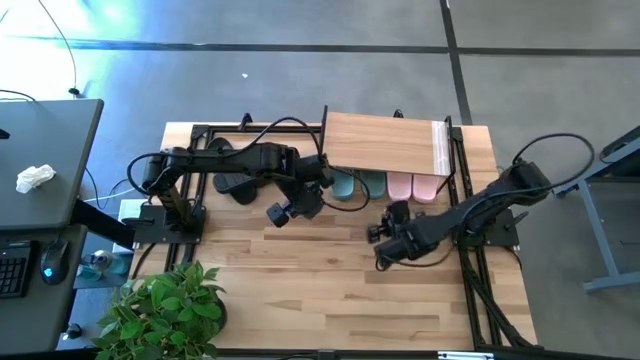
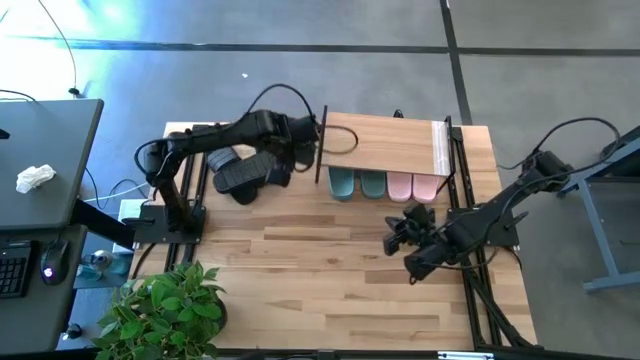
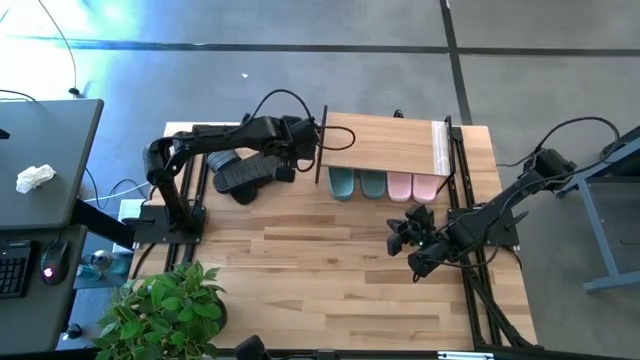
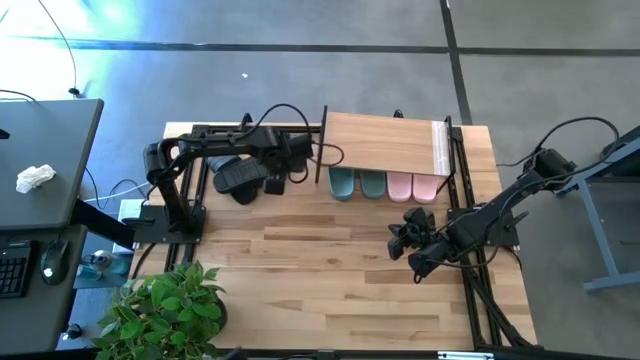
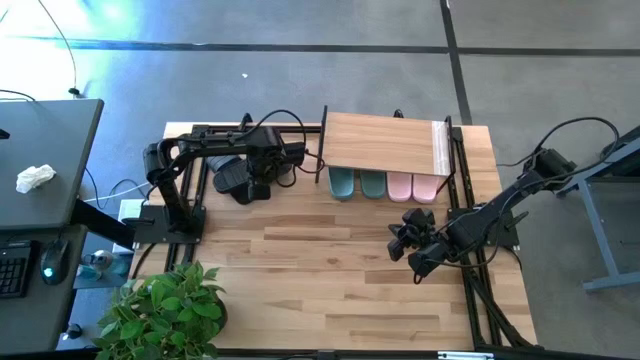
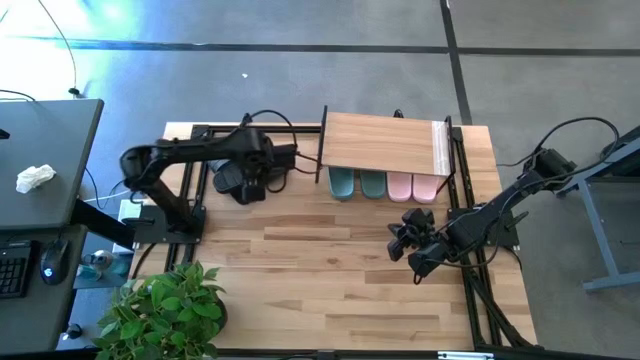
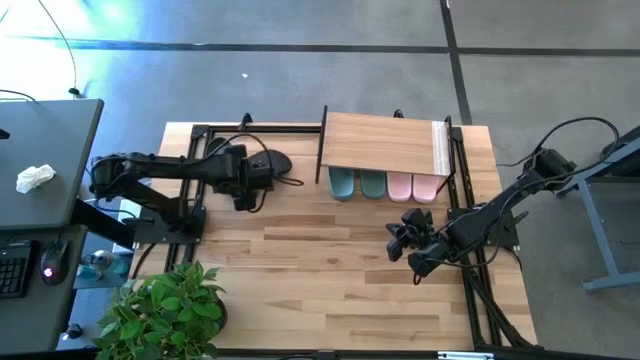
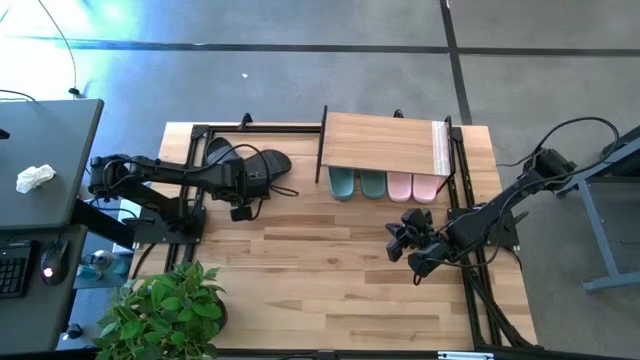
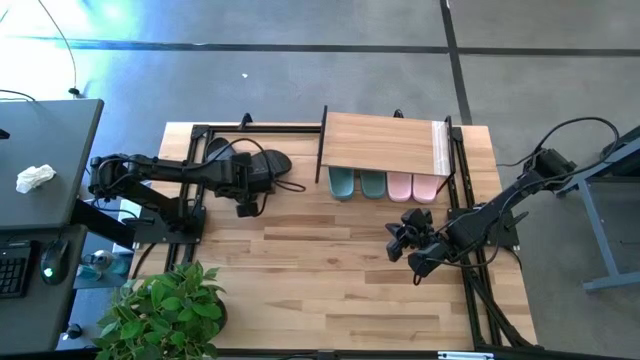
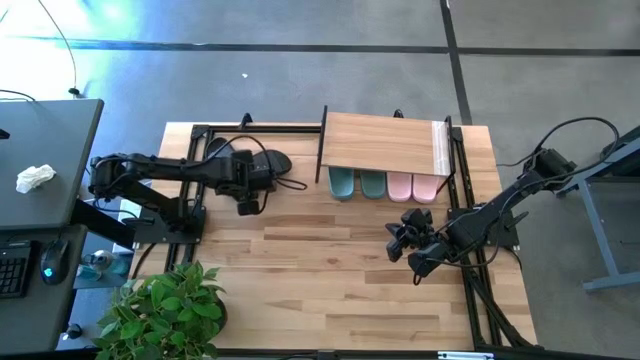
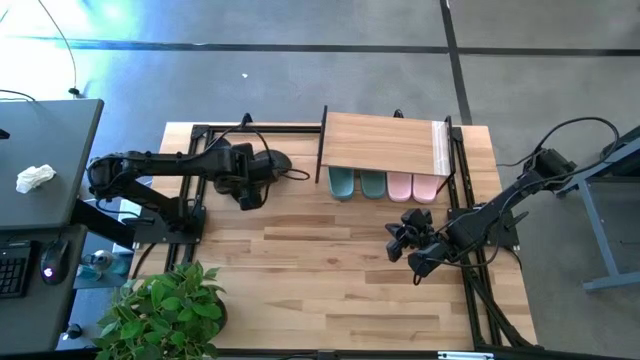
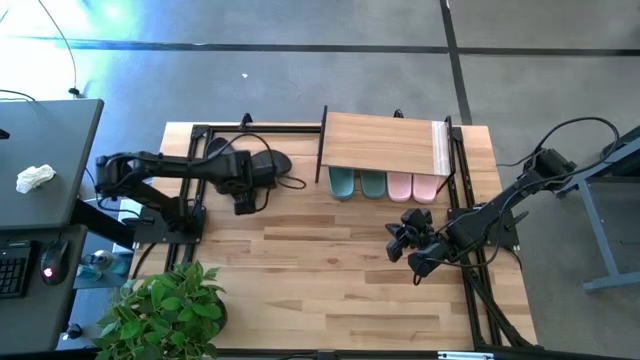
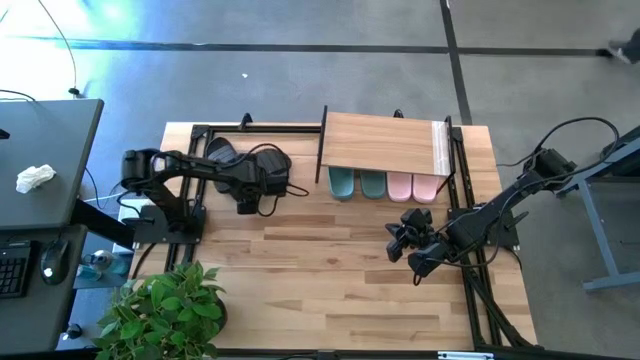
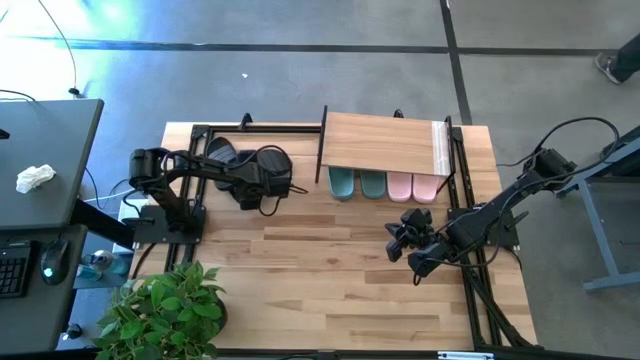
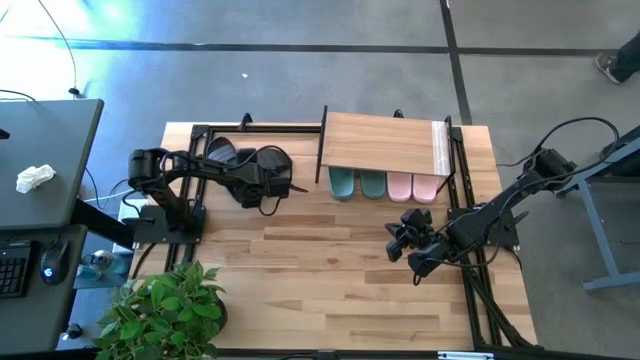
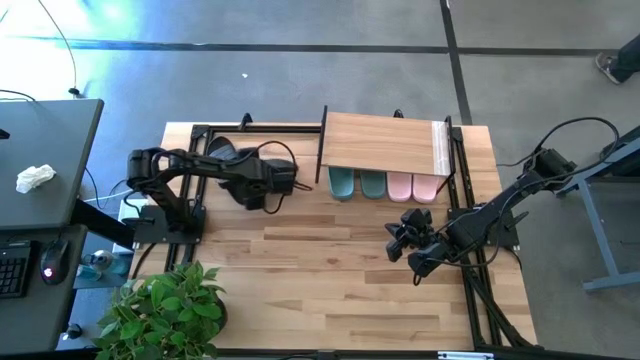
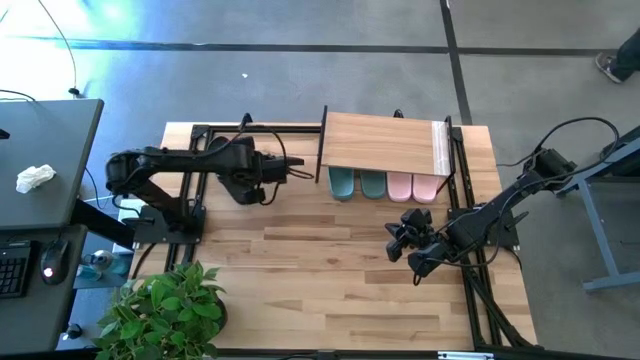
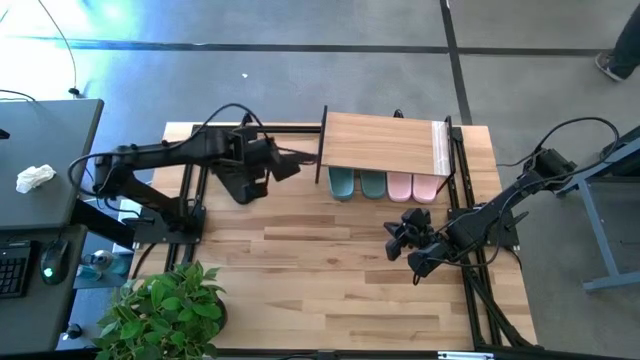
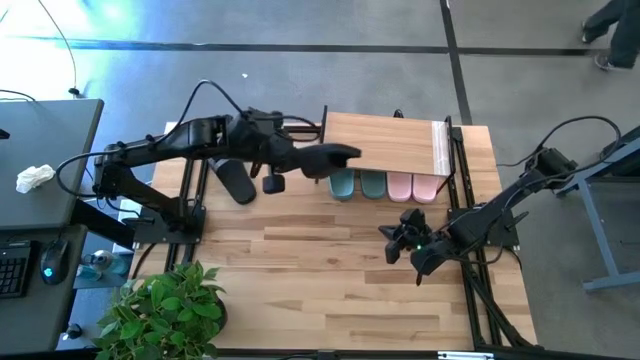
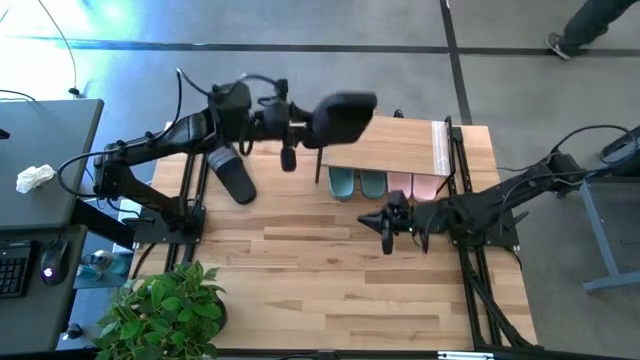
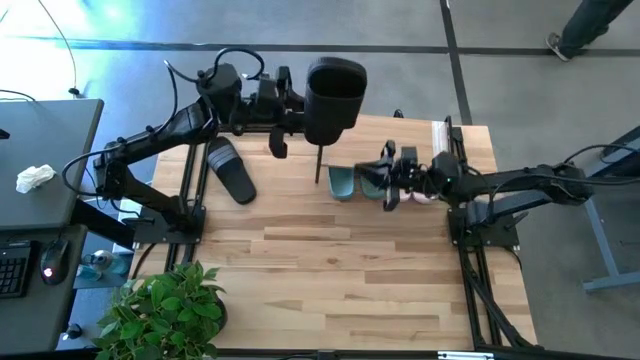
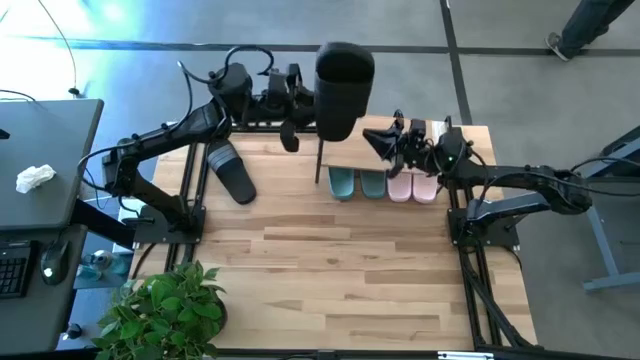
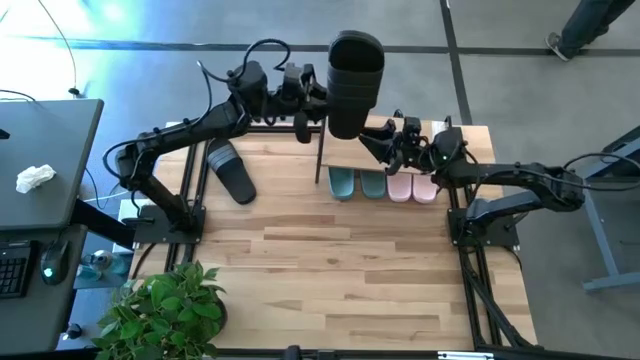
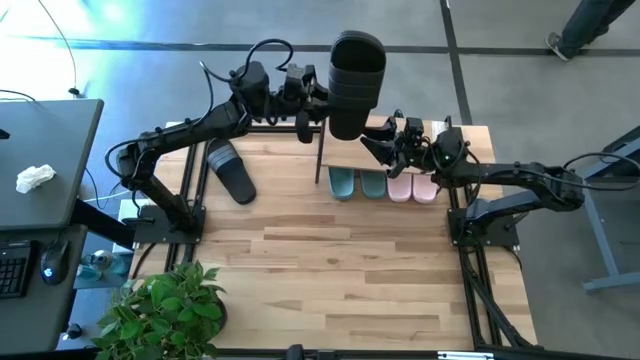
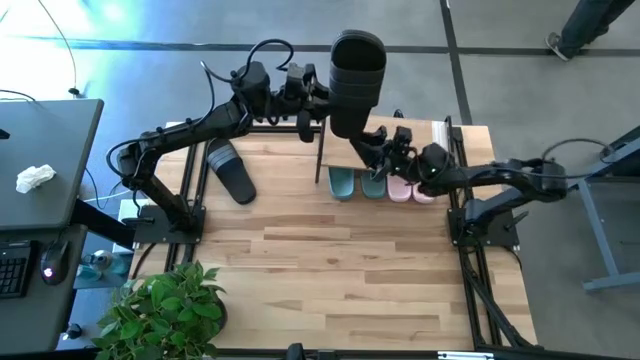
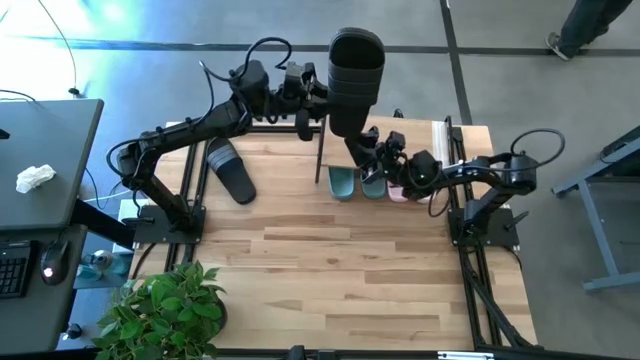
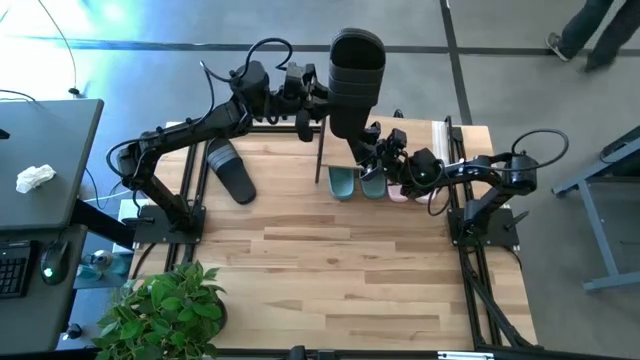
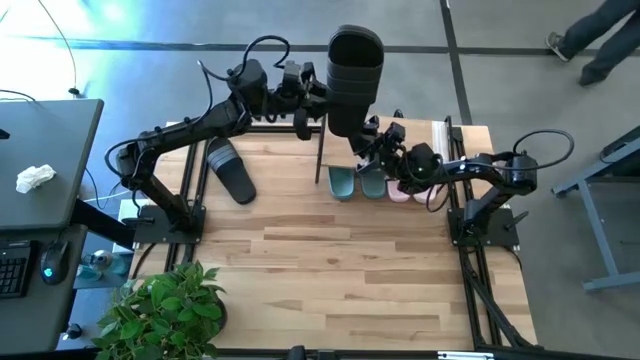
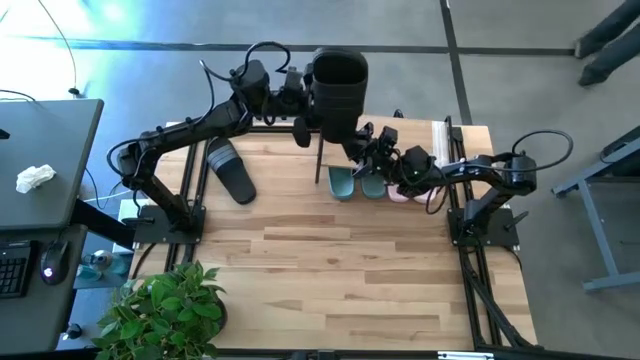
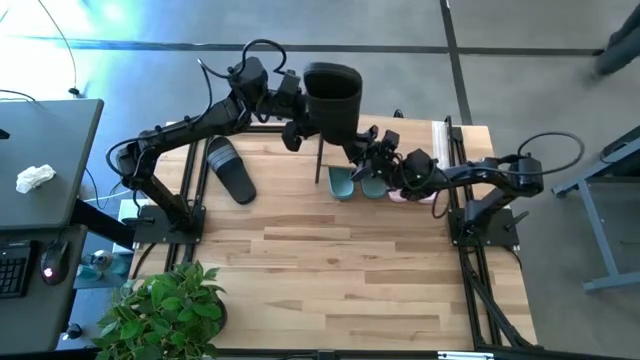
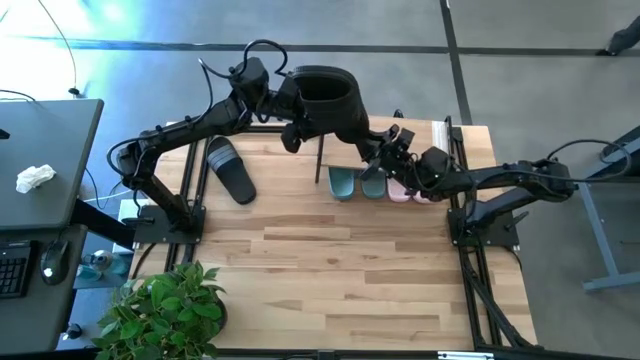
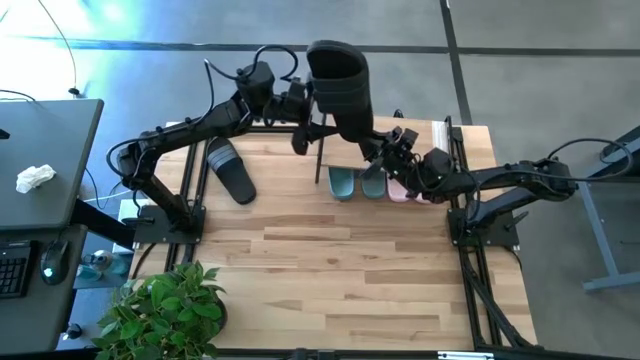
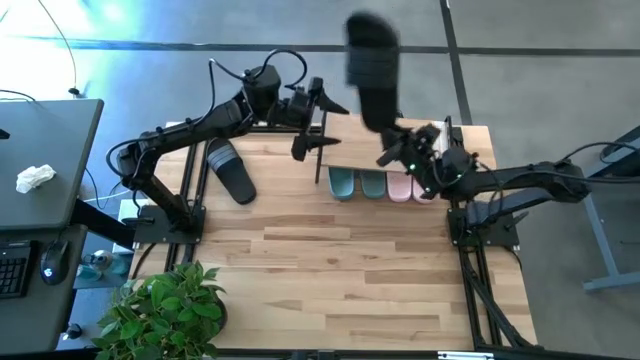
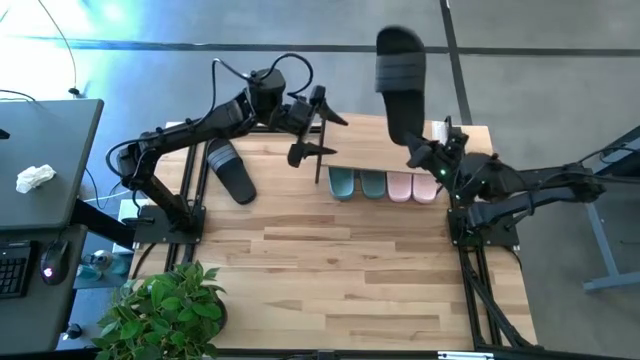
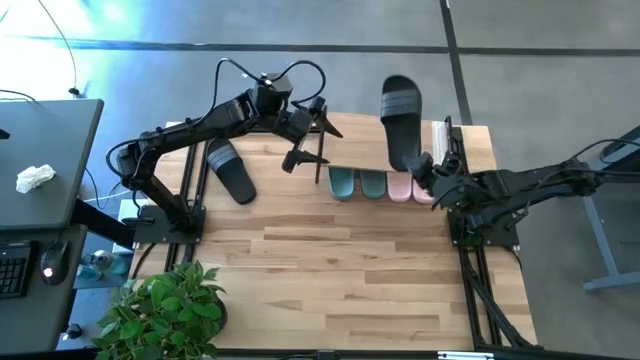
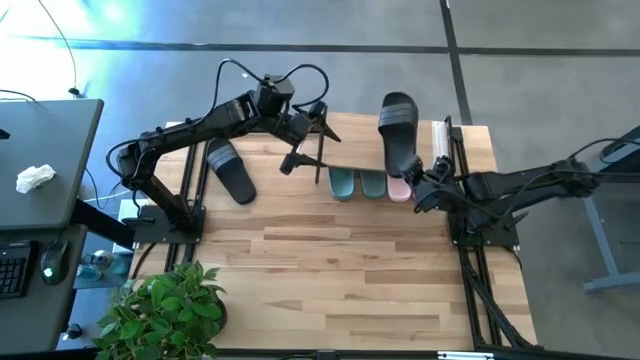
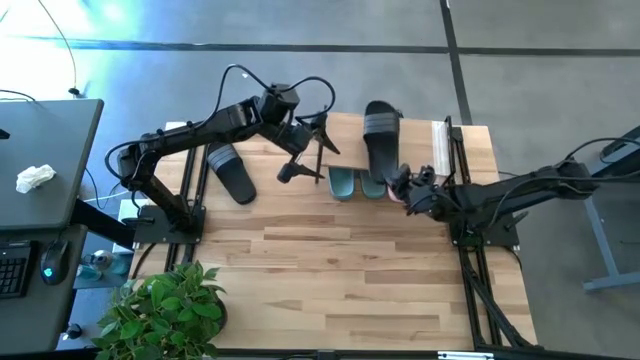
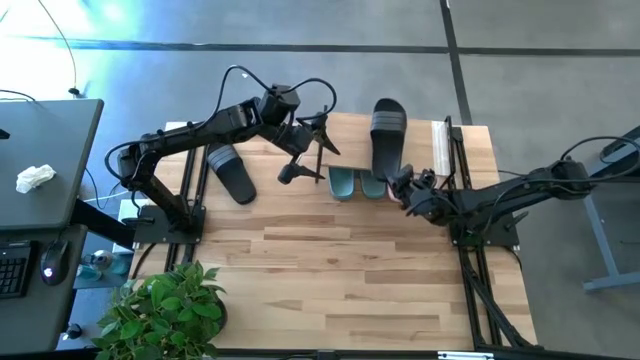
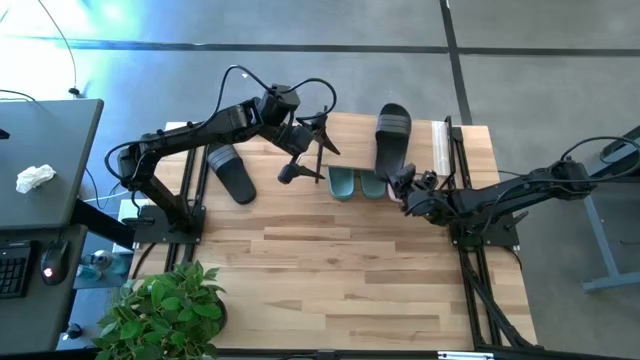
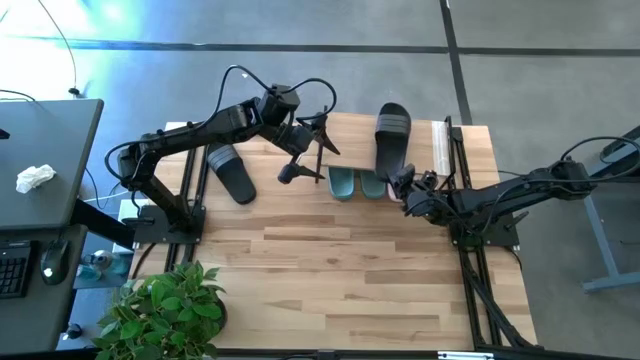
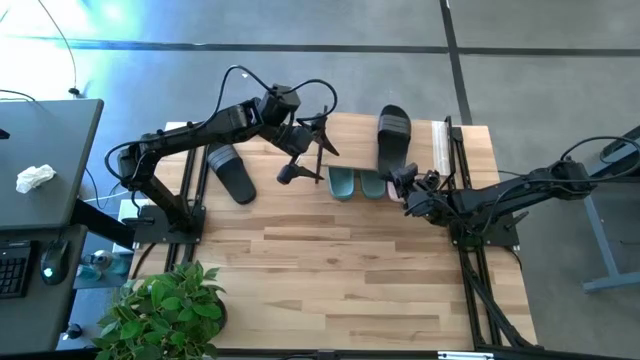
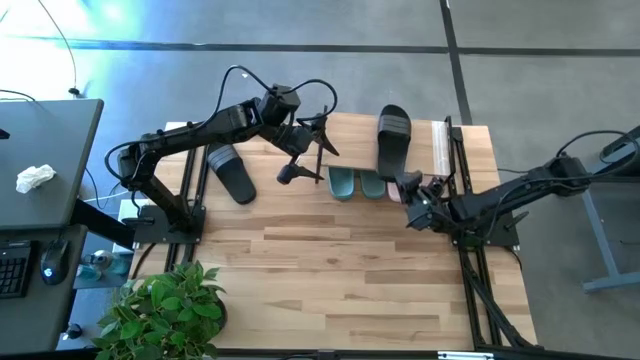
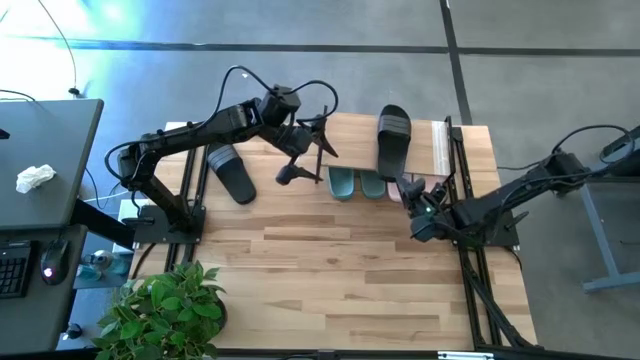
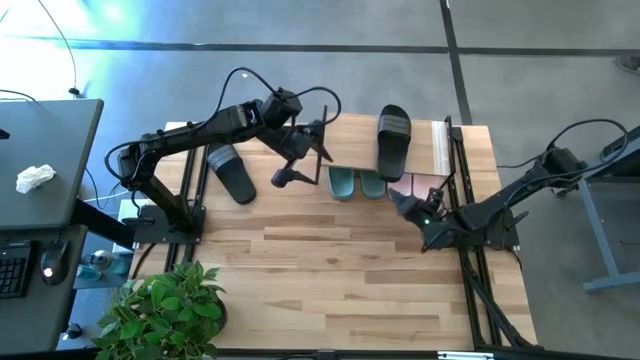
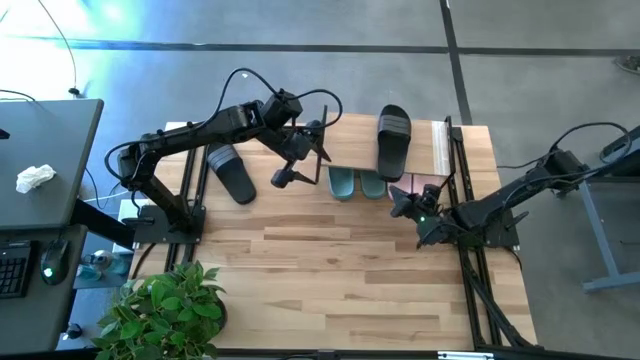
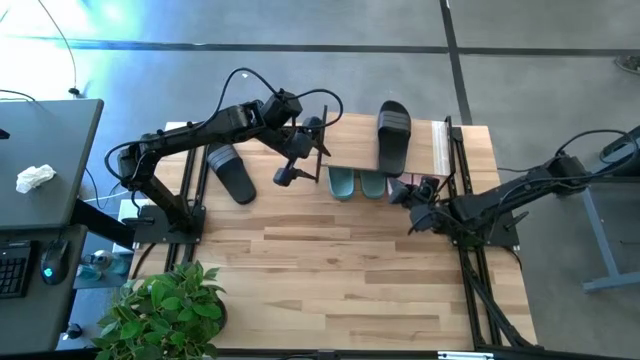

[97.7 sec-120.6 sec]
Task: Pick and place slides into the shelf
Put the right black slide on the shelf
